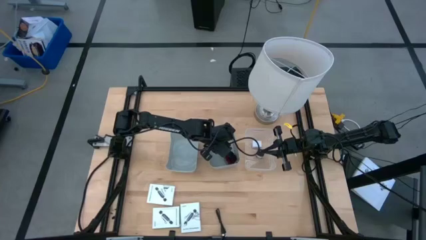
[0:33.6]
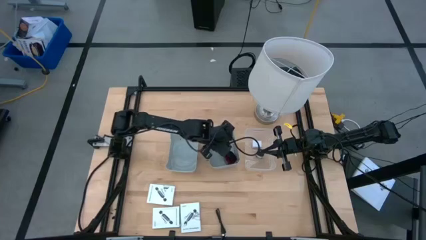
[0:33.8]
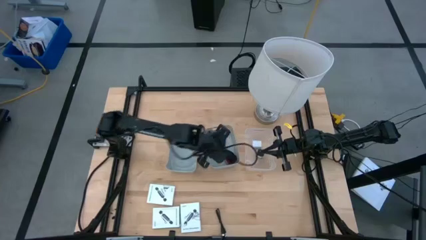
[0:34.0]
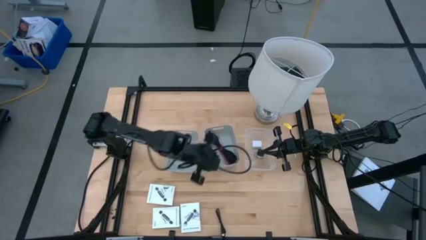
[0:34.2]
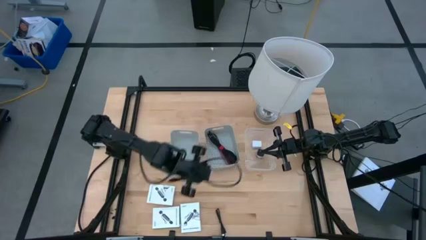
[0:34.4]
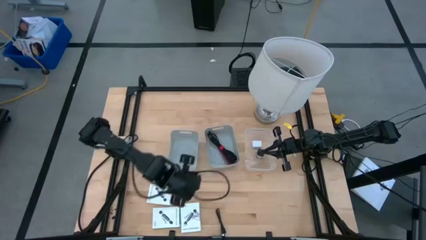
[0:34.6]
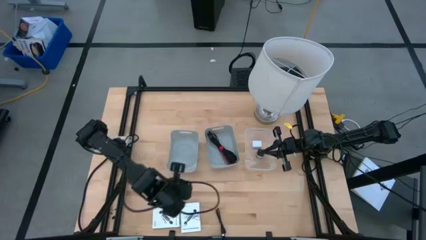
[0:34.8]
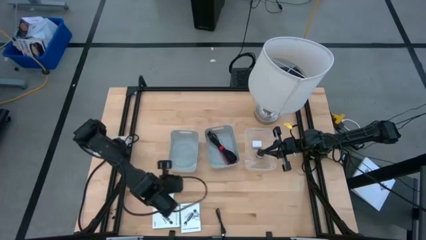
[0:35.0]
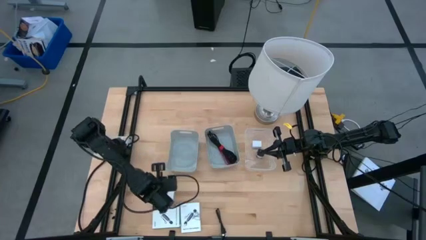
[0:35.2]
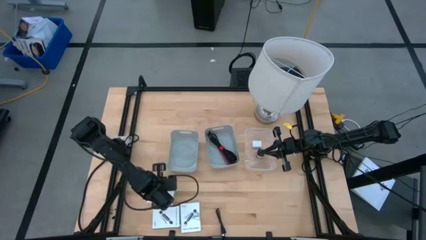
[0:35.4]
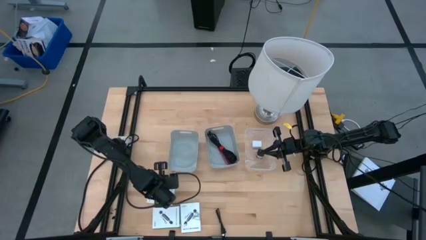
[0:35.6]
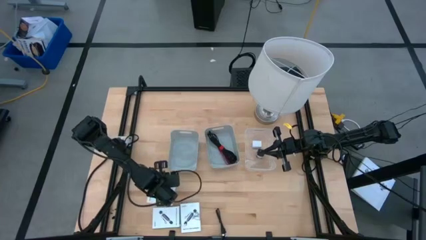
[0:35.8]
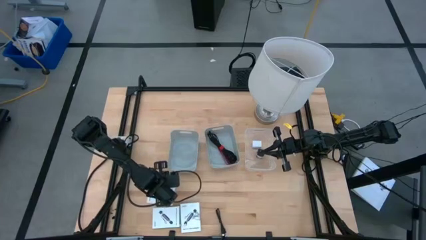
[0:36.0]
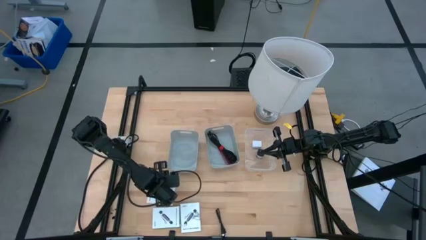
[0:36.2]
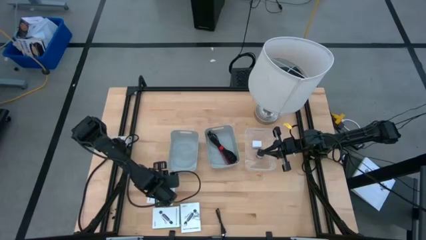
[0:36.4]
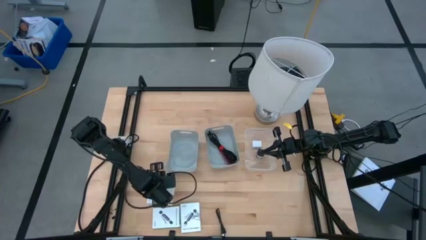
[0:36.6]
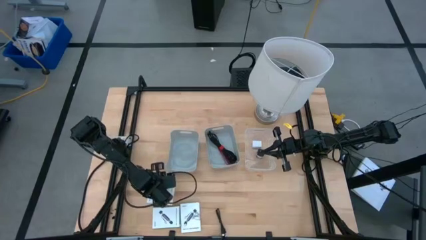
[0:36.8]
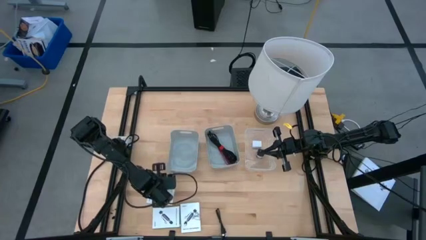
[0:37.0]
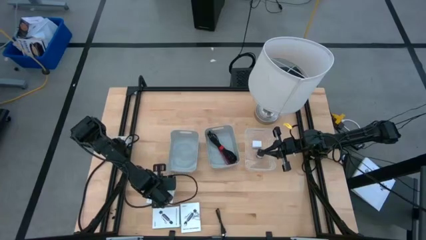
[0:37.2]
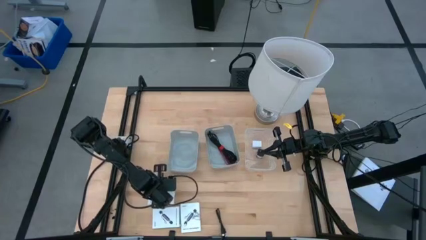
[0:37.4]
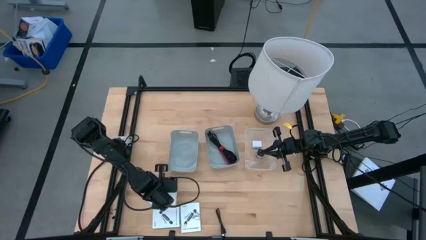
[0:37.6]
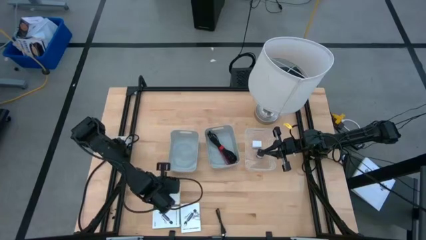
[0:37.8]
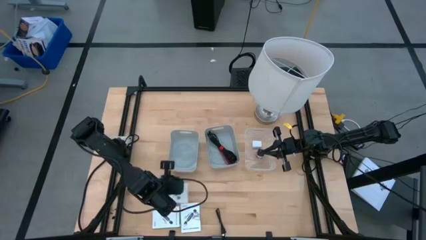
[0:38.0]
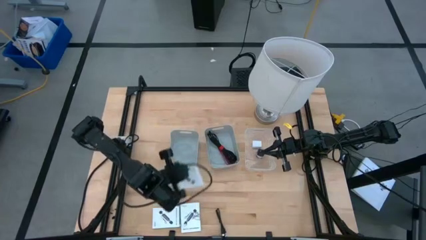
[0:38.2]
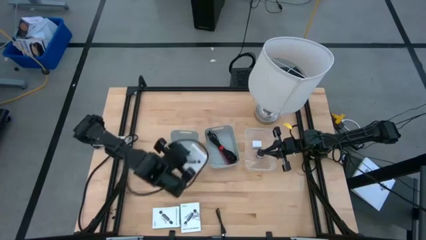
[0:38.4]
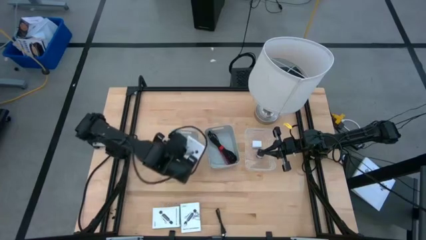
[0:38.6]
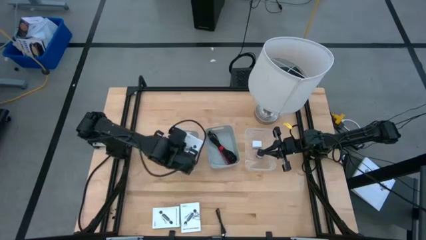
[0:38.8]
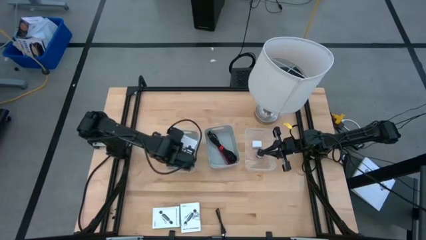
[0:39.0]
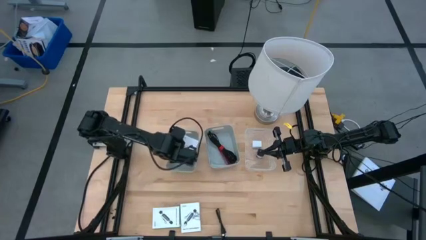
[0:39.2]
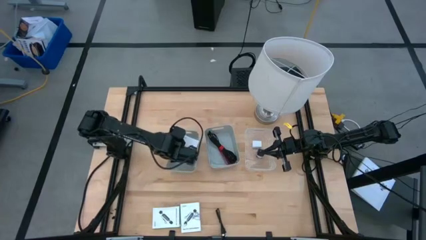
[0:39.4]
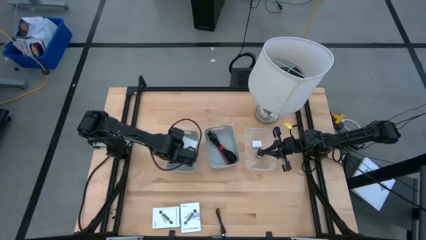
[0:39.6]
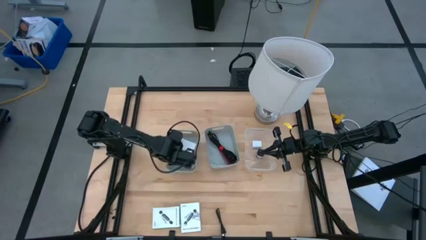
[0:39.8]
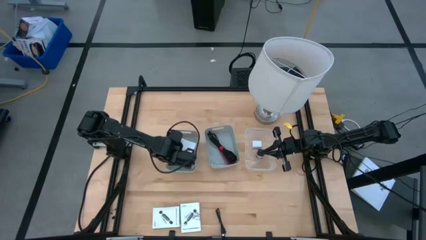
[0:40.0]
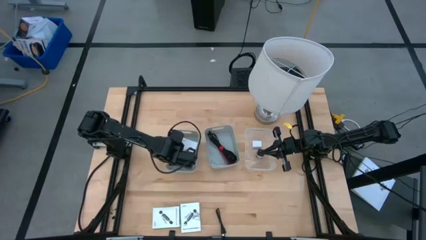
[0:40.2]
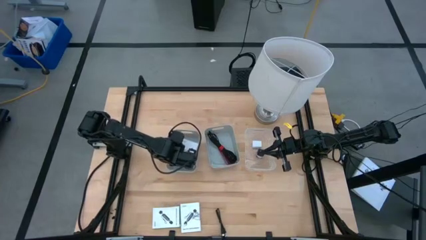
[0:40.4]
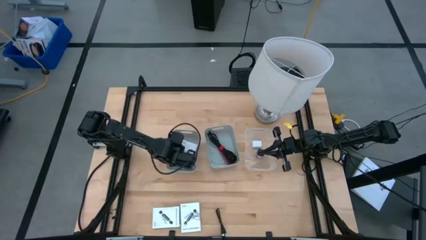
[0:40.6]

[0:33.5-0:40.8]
Task: Pick and place items into bin
Put the top card reader box into the left gray bin

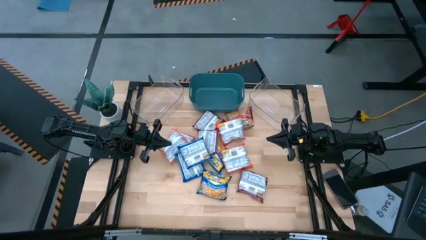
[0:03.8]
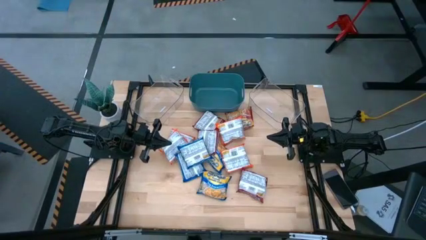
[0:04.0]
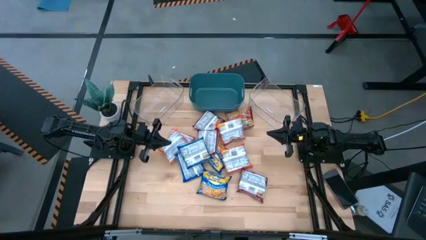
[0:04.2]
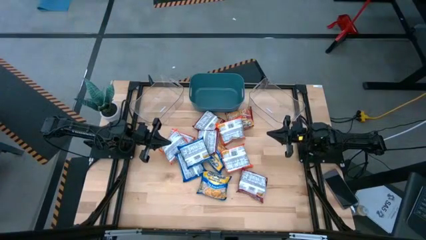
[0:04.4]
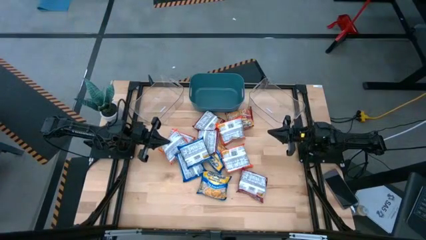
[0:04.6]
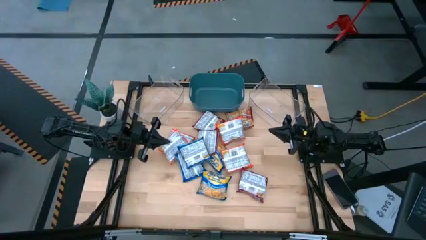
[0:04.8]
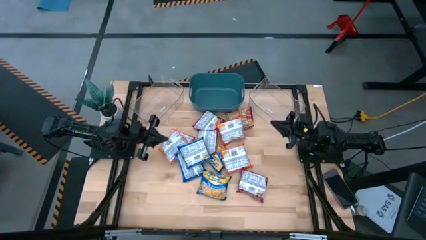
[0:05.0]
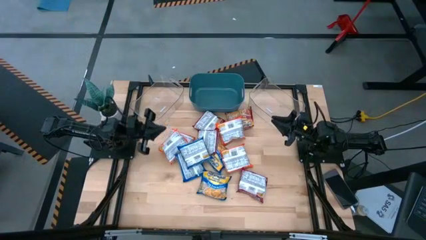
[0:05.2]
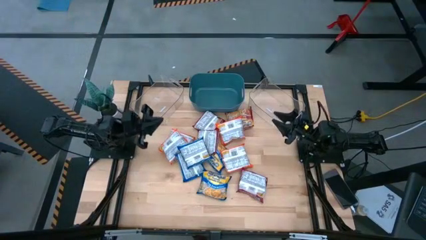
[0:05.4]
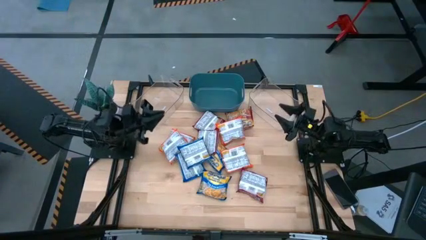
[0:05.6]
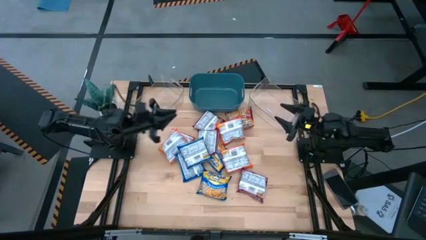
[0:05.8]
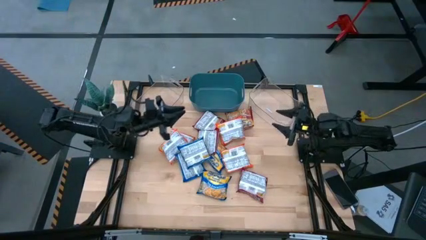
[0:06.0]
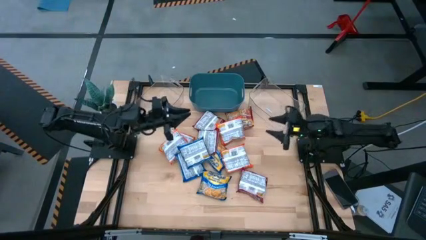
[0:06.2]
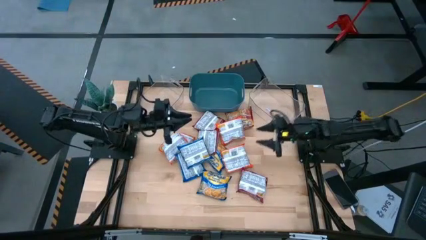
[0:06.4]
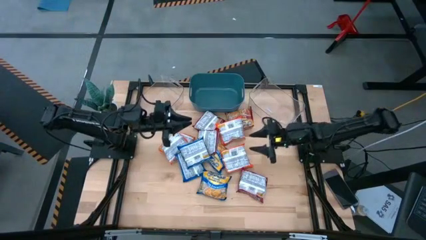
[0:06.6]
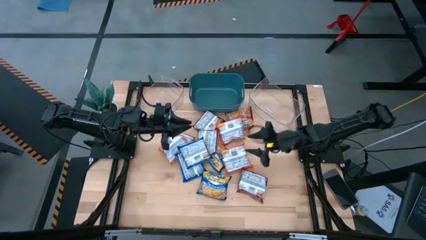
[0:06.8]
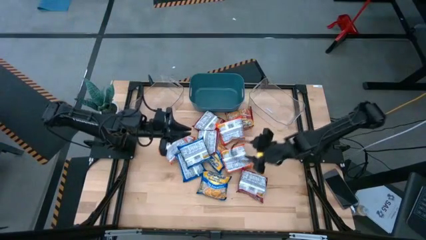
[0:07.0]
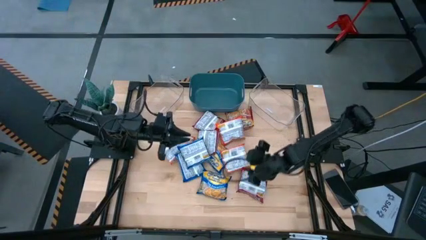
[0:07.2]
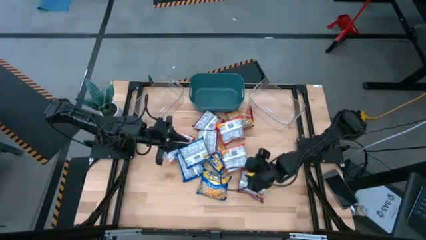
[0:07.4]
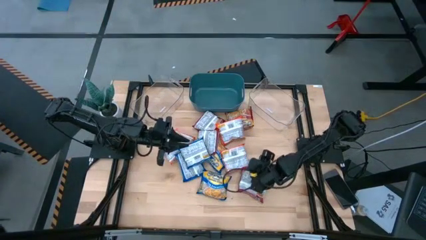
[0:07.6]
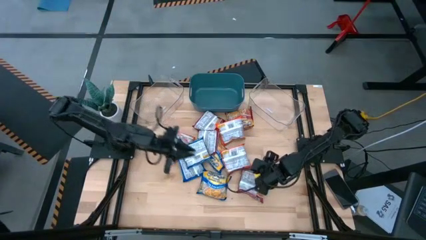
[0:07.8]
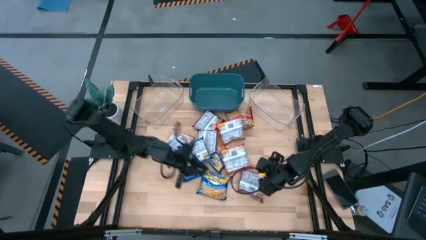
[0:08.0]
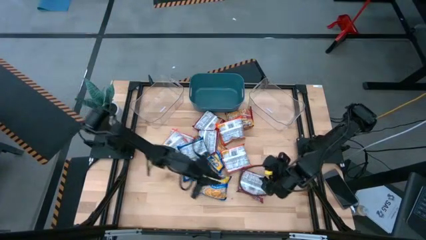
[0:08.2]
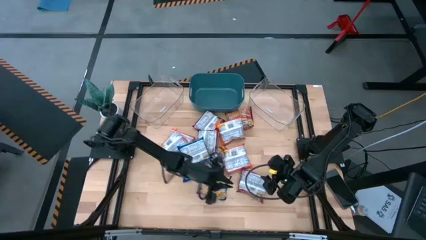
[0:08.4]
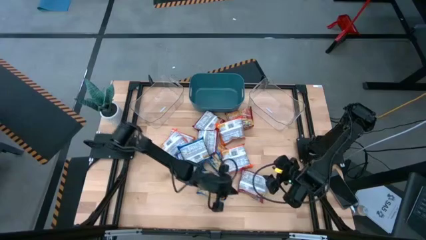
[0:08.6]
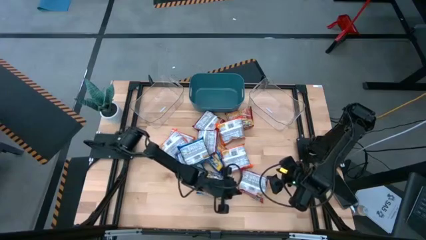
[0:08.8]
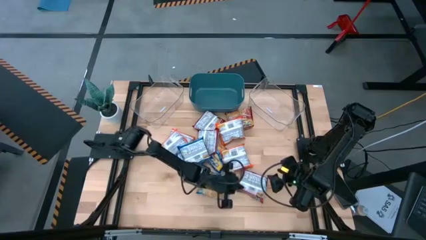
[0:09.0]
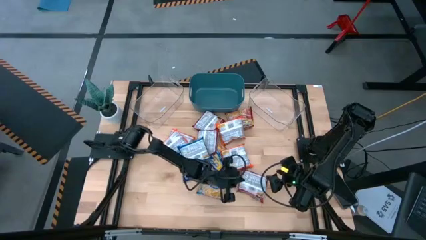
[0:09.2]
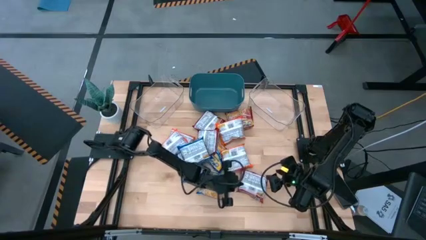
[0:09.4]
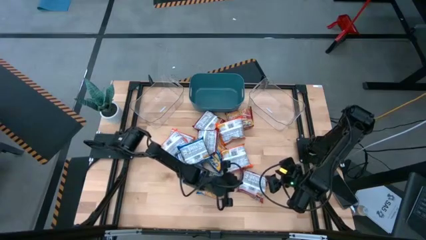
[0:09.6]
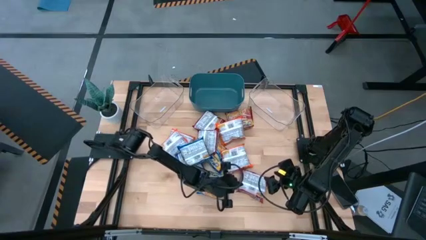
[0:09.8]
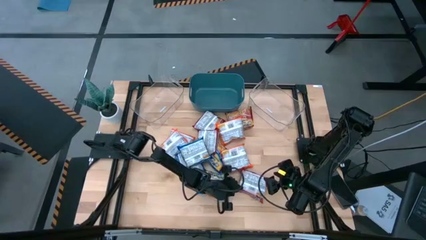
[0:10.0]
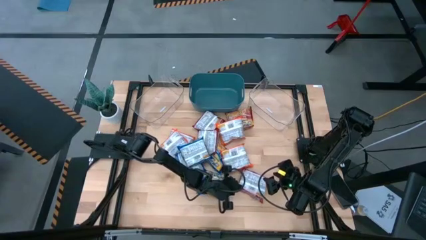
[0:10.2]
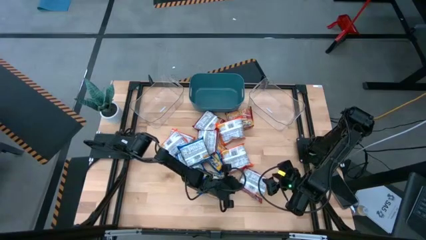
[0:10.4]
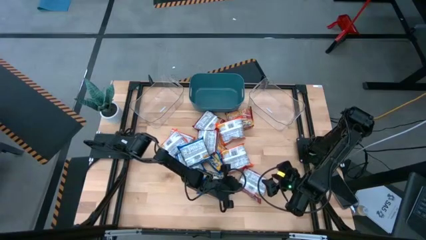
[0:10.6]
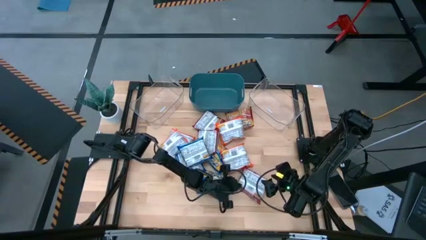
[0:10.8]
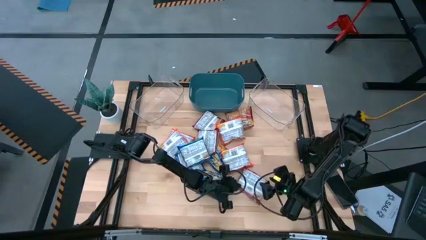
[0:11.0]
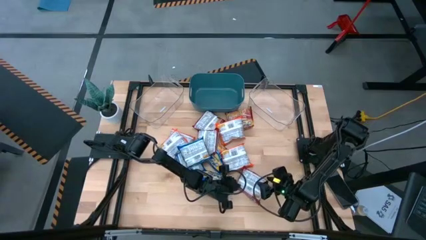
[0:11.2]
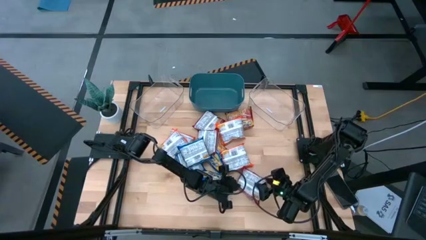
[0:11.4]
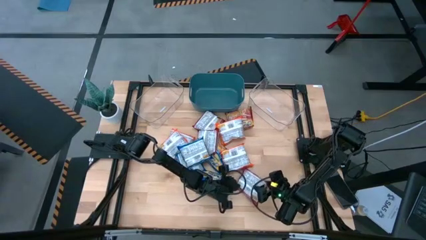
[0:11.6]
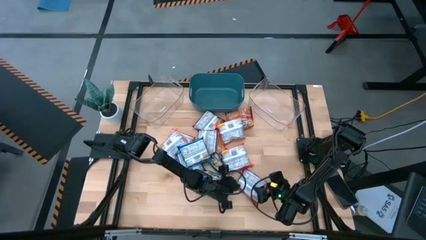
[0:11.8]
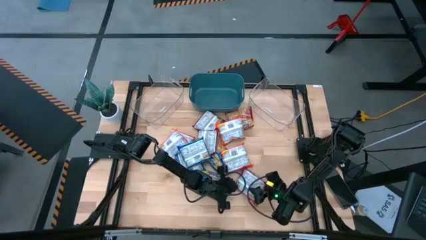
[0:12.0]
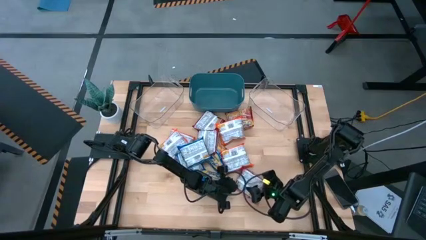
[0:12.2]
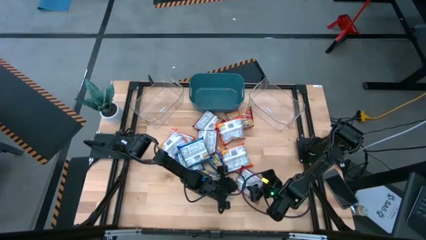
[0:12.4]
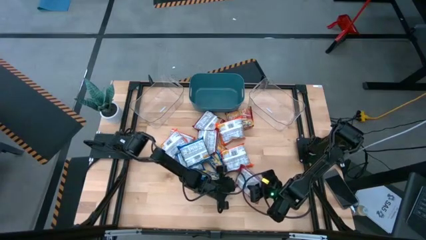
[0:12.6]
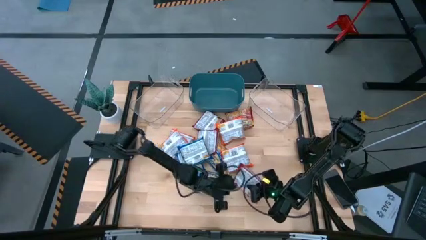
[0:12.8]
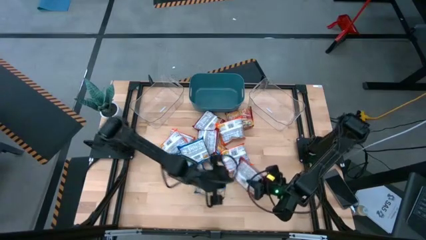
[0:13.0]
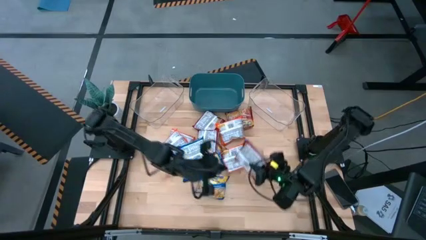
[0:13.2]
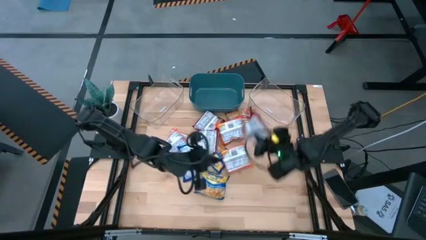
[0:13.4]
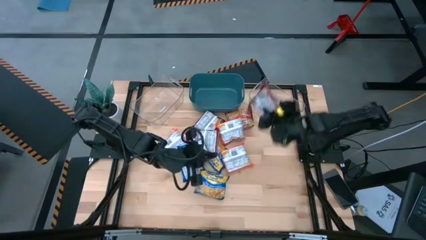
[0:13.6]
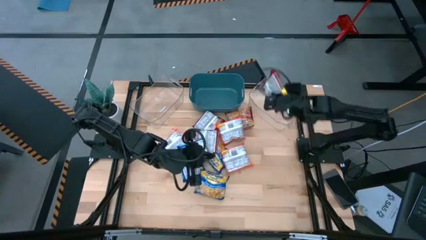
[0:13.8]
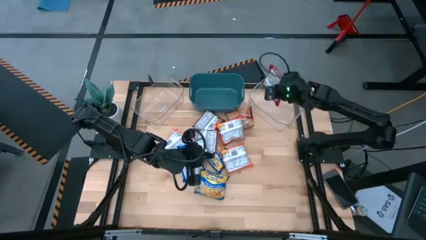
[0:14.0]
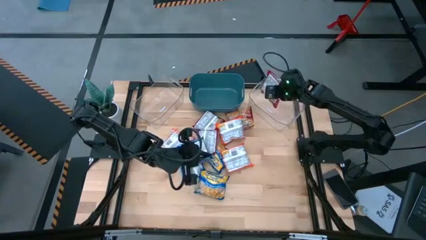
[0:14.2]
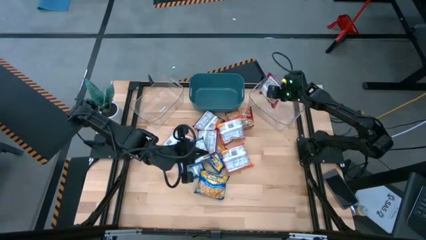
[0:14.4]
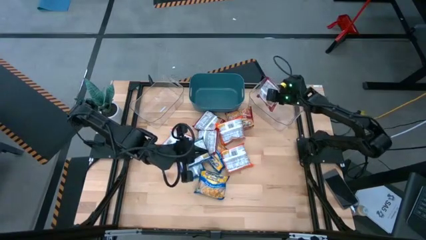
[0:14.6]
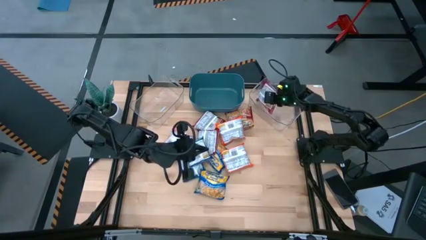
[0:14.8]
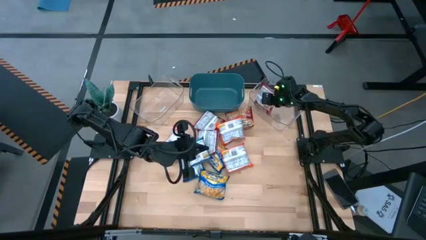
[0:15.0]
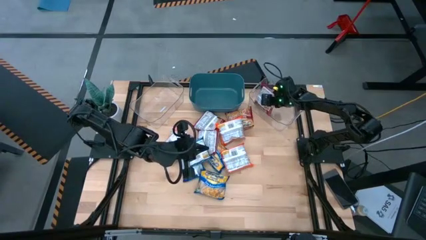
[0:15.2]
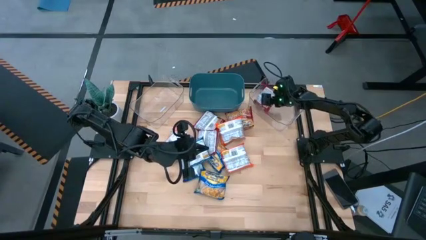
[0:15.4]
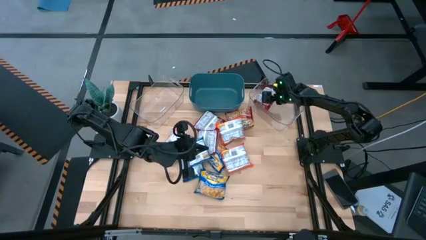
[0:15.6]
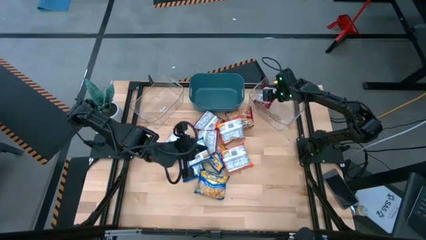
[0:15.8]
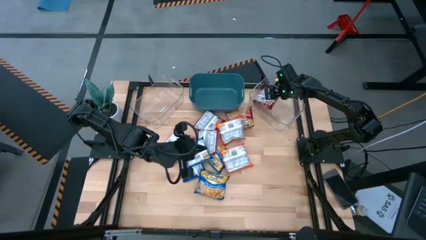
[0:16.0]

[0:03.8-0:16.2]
Task: Sort Maruchan noodles
Put the red noodle pack into the right transparent bin
